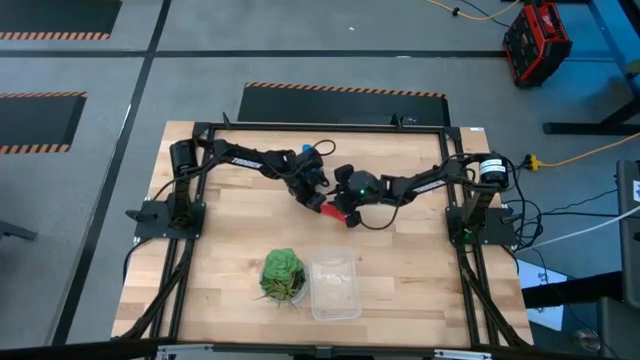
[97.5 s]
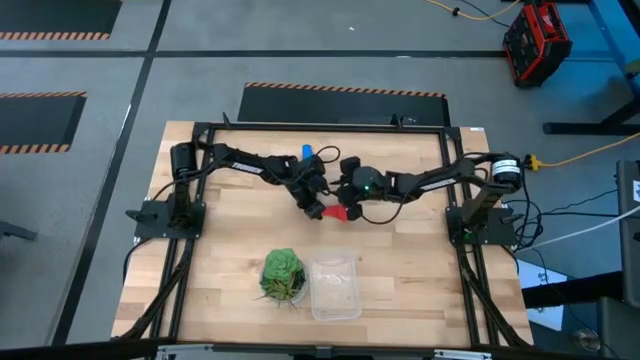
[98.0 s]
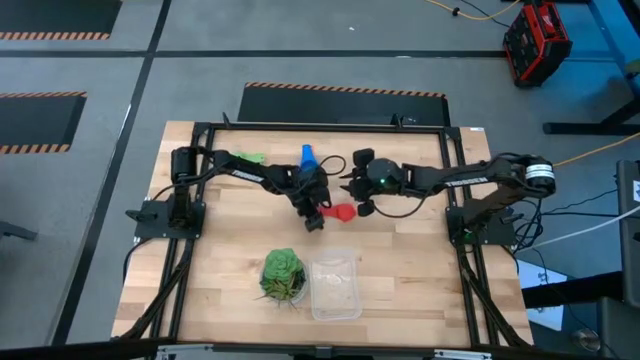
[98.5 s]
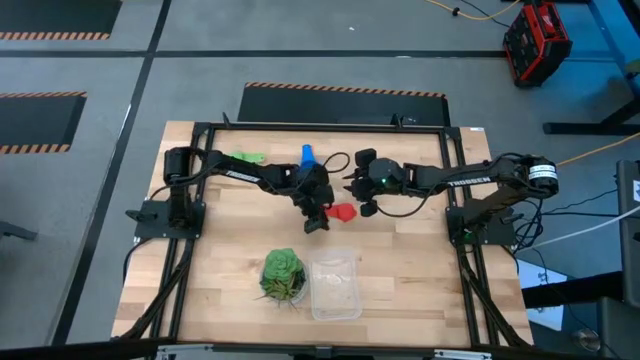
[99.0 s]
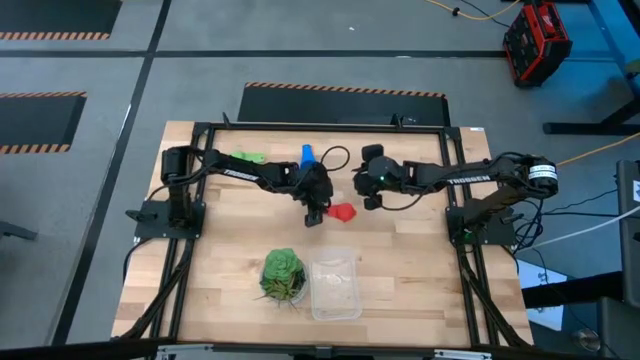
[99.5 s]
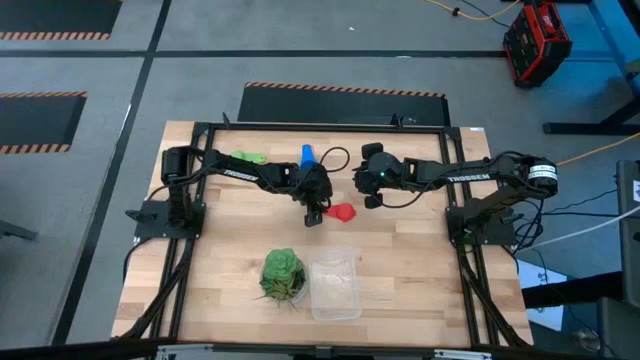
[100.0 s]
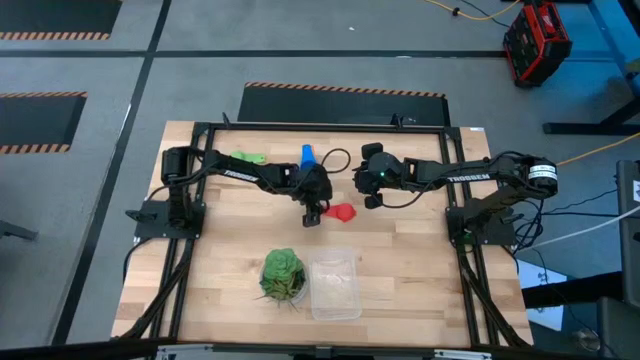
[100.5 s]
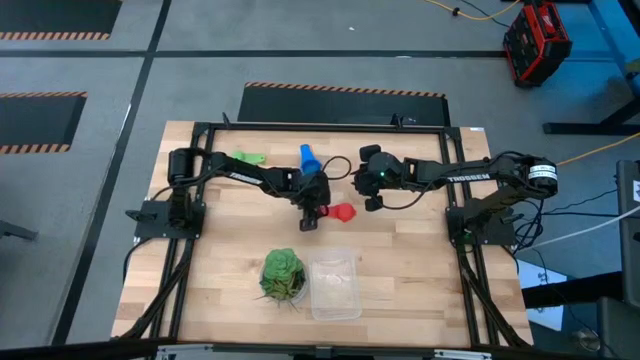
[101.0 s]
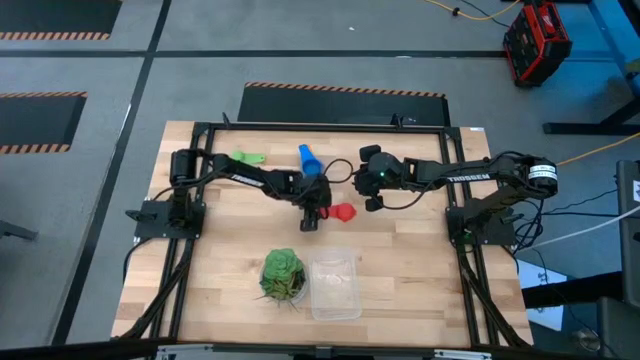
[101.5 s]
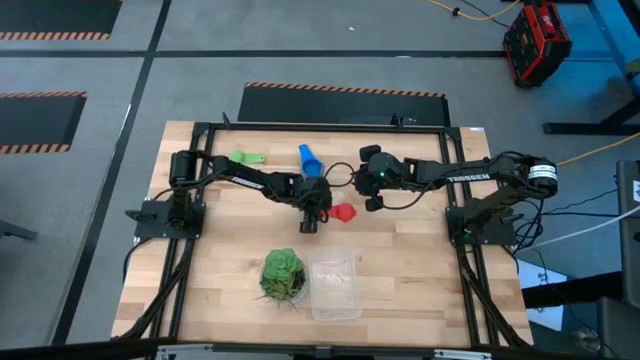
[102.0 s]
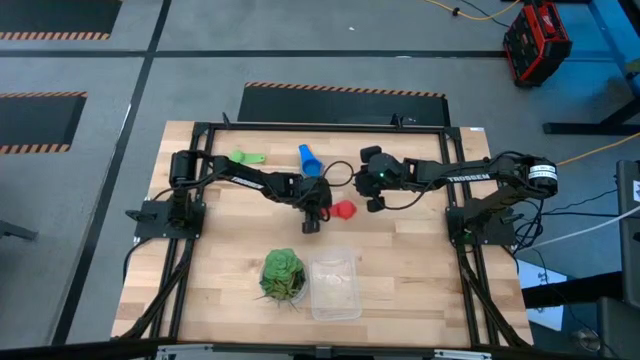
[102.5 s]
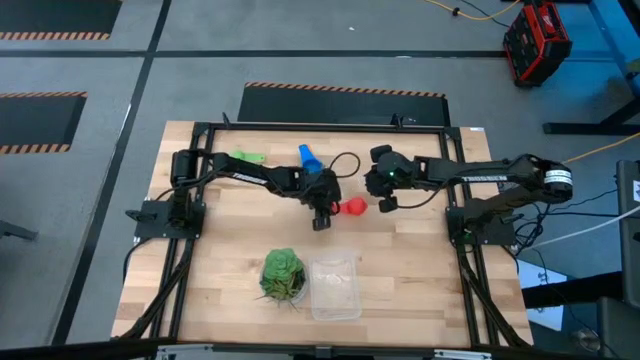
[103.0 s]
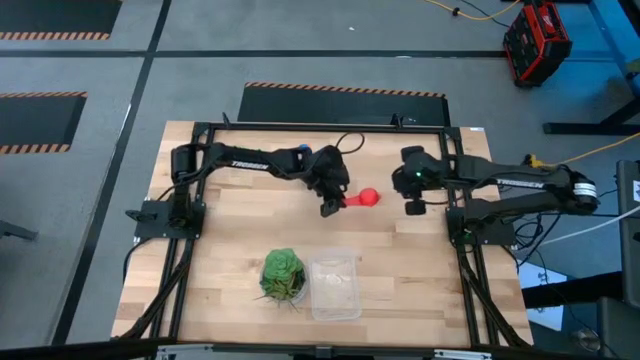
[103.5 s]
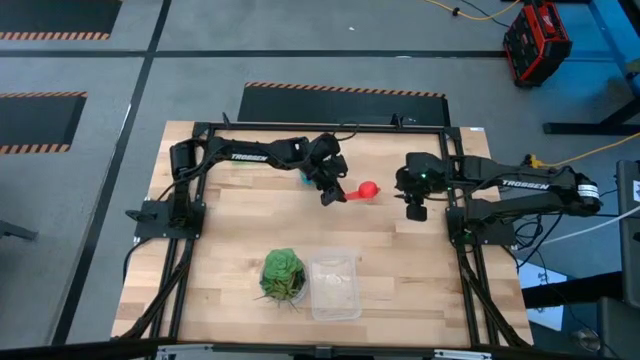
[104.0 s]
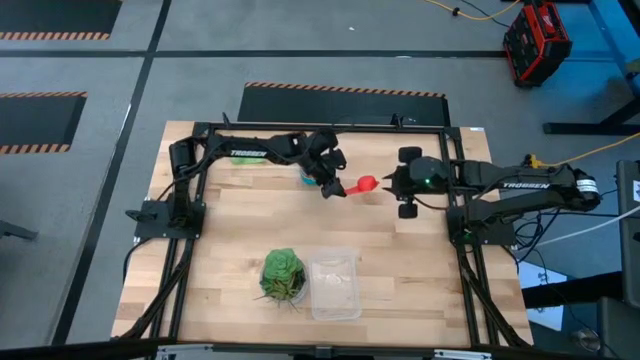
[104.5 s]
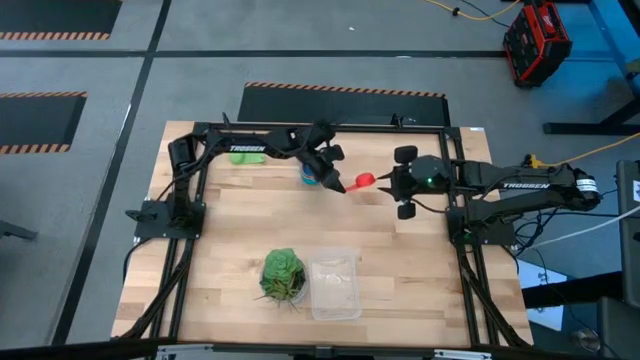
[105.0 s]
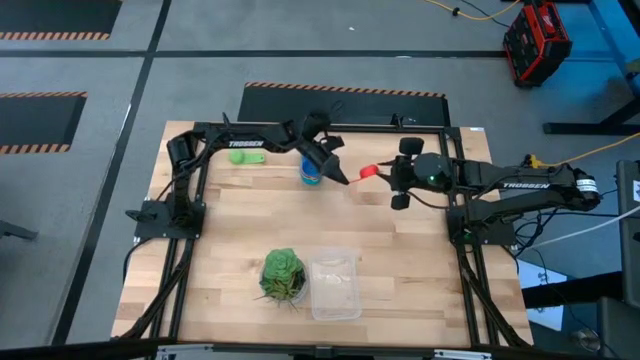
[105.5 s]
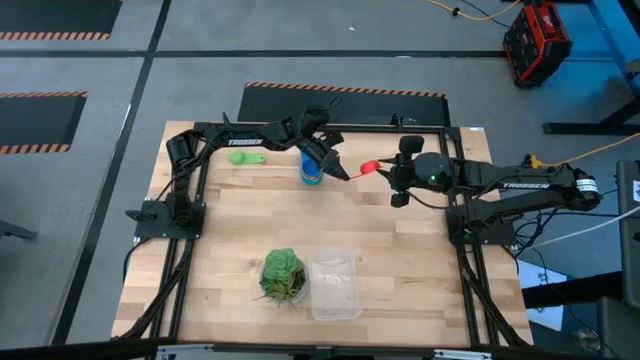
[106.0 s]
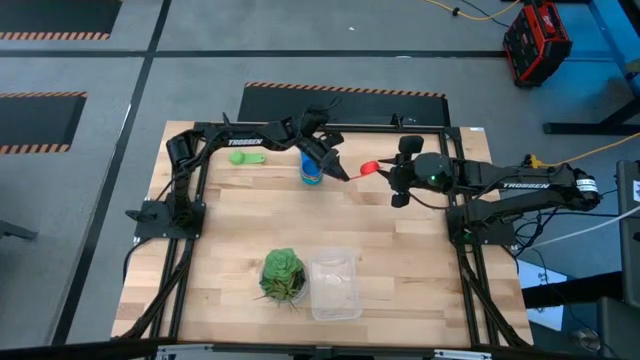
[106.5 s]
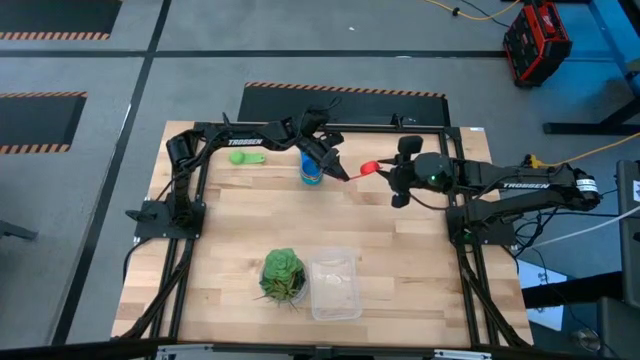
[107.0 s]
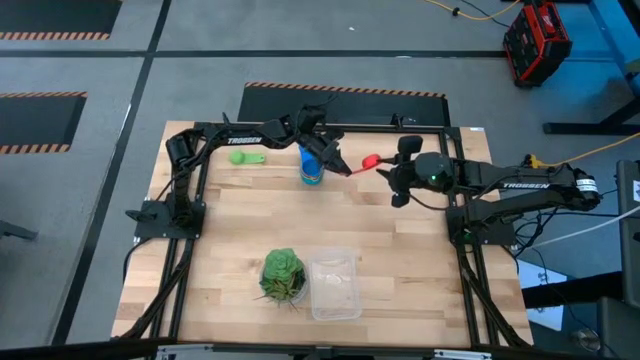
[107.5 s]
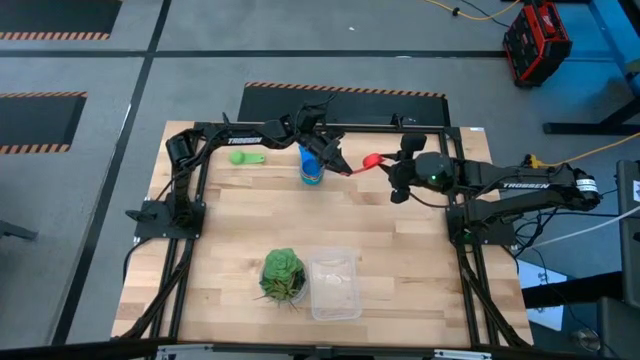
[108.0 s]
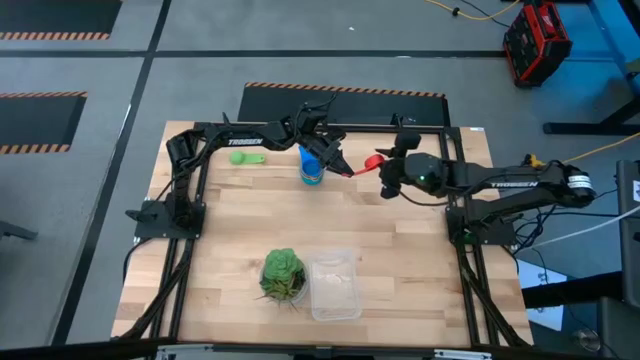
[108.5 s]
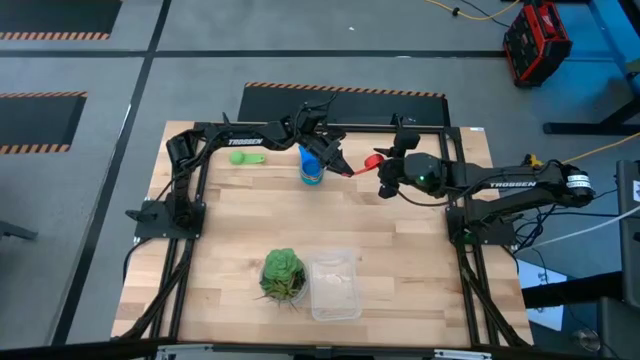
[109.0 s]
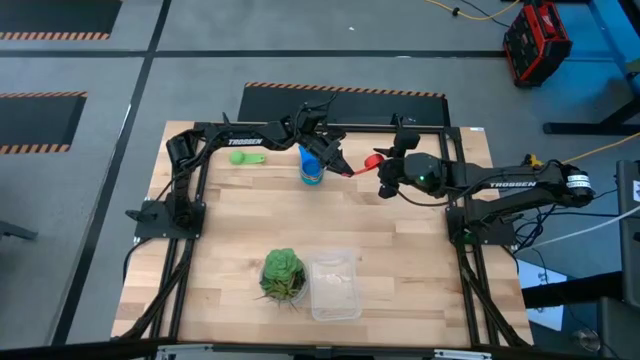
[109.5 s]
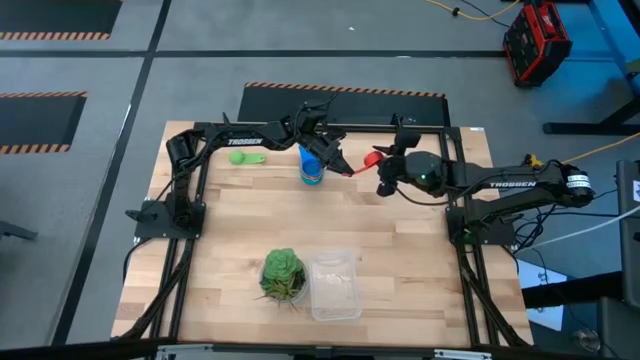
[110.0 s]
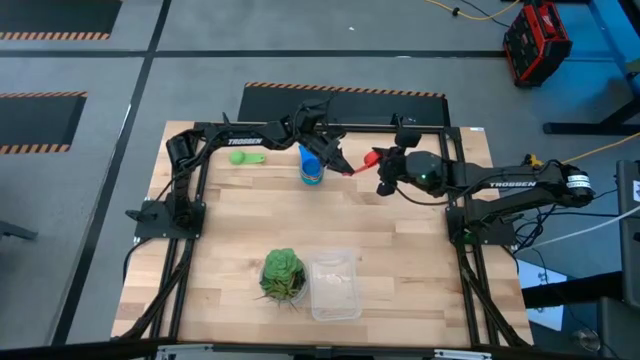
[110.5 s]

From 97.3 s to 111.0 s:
Task: Nest measuring cups in basket
Stack the red measuring cup on top of the blue measuring cup
